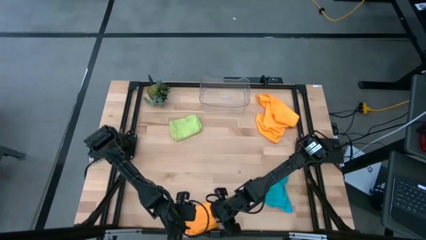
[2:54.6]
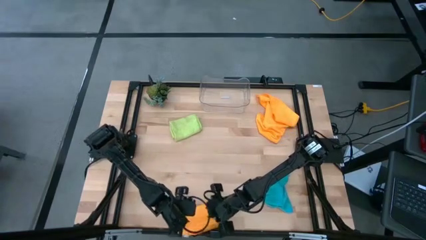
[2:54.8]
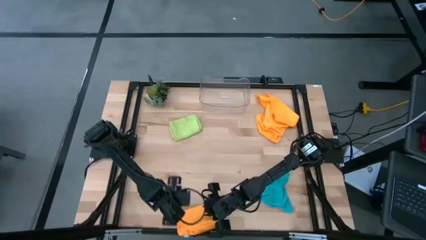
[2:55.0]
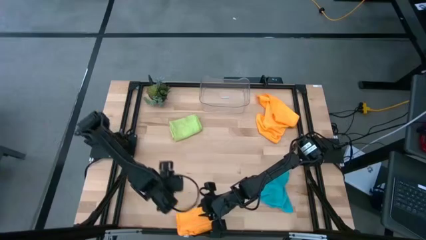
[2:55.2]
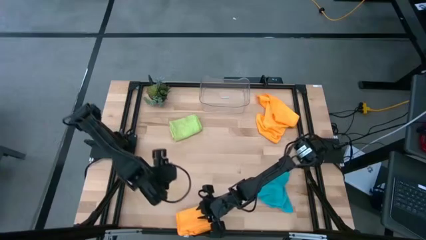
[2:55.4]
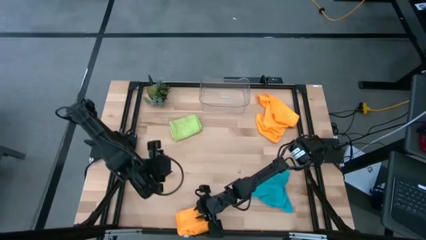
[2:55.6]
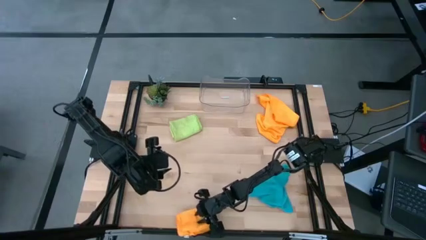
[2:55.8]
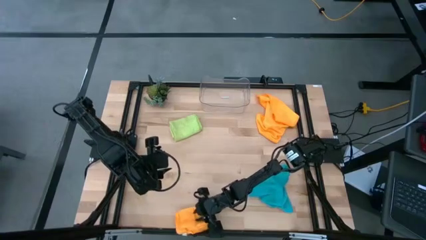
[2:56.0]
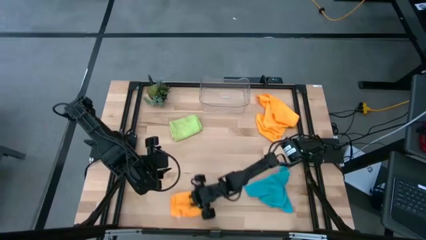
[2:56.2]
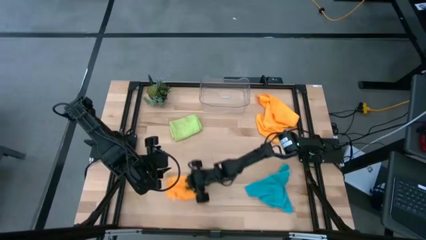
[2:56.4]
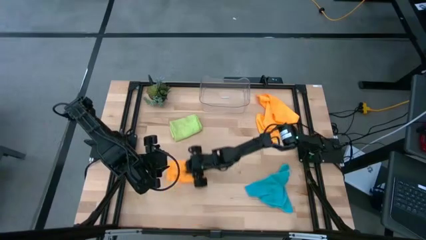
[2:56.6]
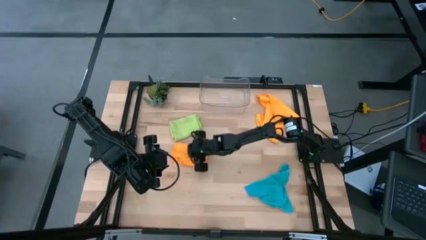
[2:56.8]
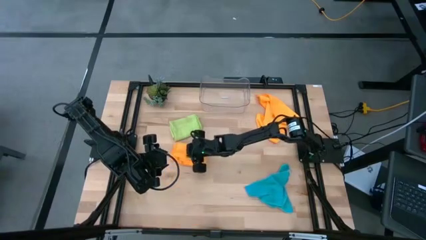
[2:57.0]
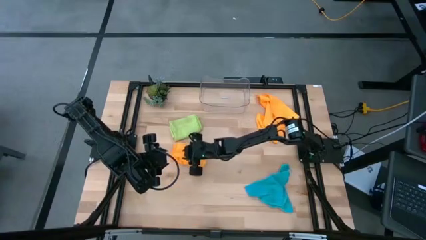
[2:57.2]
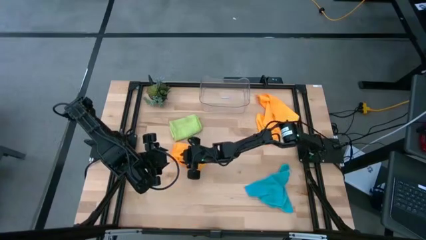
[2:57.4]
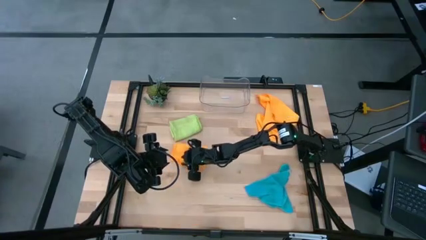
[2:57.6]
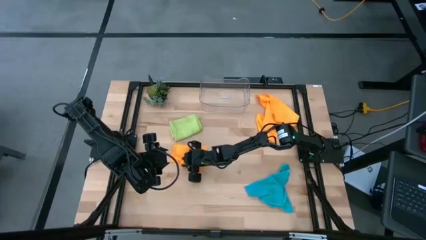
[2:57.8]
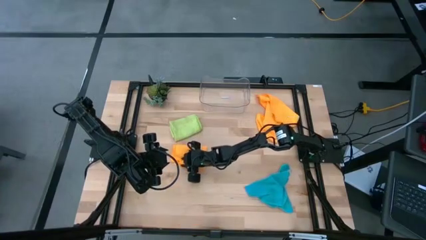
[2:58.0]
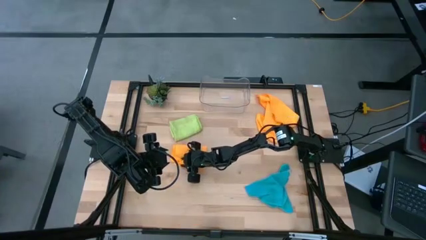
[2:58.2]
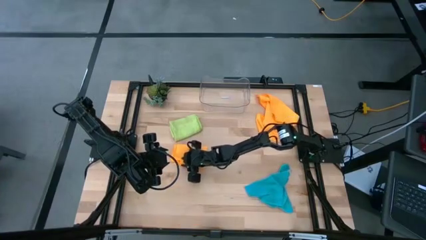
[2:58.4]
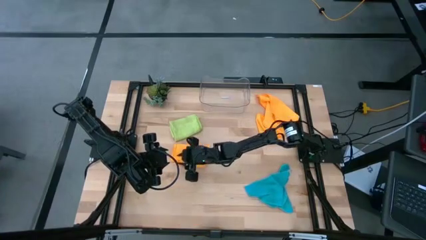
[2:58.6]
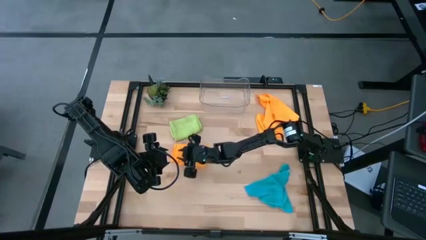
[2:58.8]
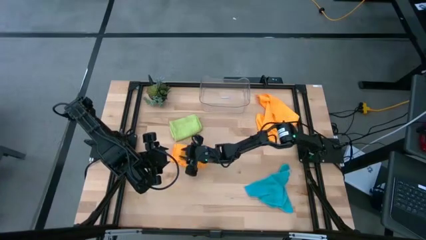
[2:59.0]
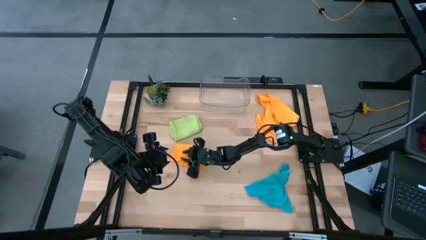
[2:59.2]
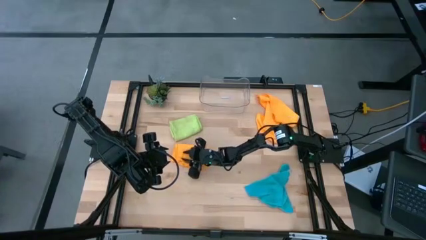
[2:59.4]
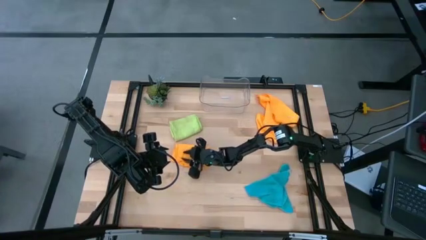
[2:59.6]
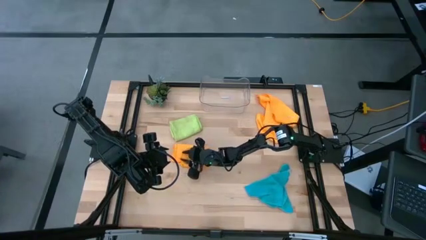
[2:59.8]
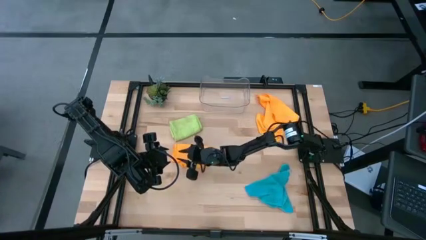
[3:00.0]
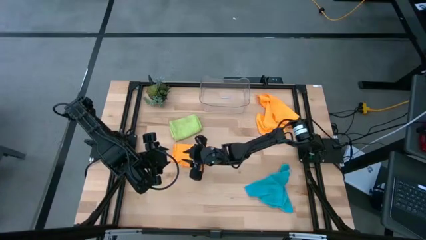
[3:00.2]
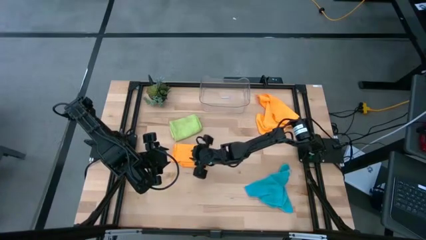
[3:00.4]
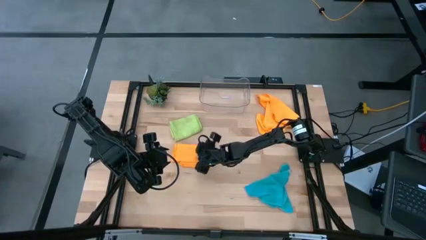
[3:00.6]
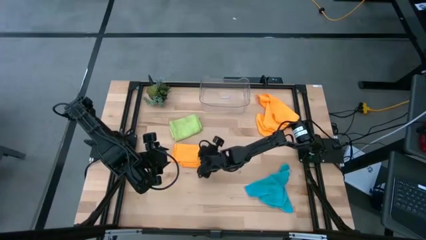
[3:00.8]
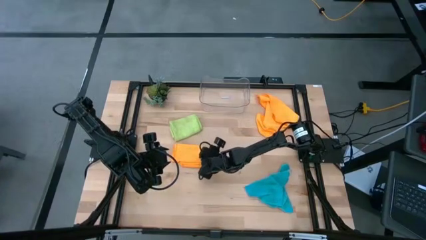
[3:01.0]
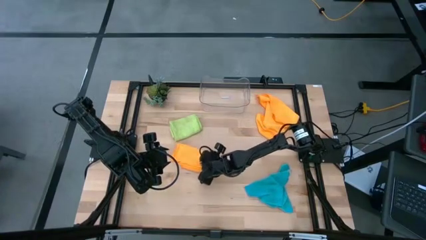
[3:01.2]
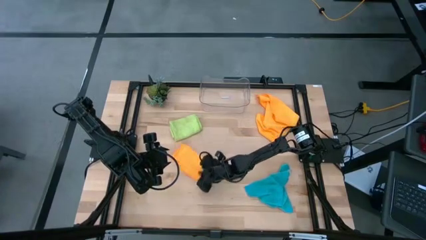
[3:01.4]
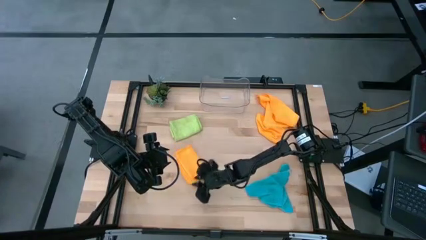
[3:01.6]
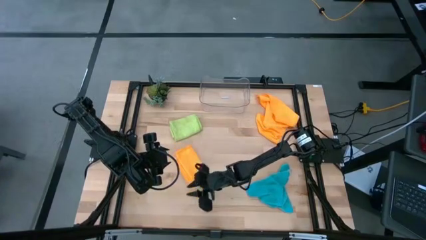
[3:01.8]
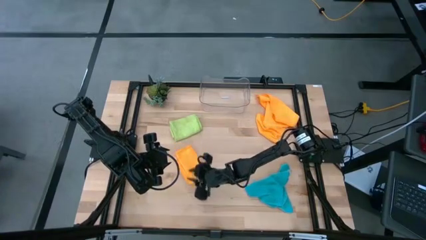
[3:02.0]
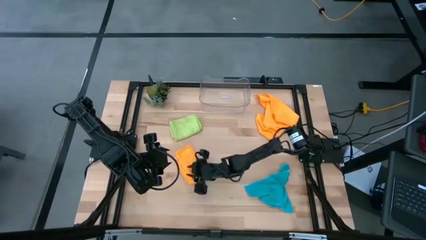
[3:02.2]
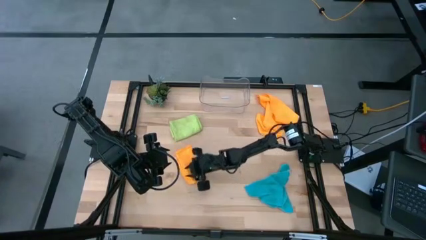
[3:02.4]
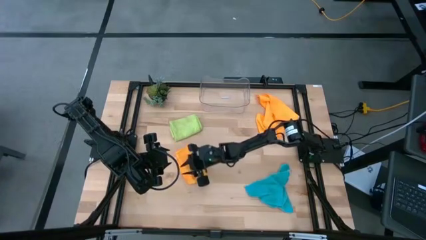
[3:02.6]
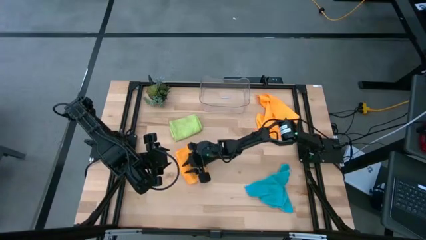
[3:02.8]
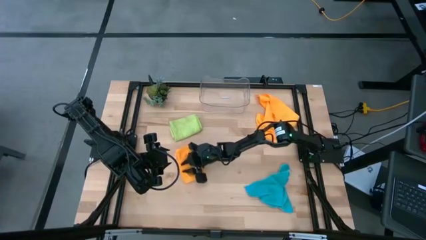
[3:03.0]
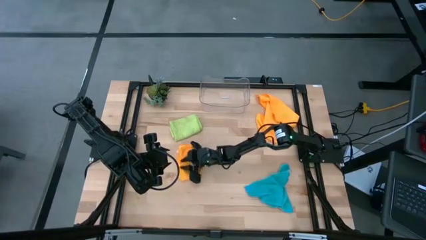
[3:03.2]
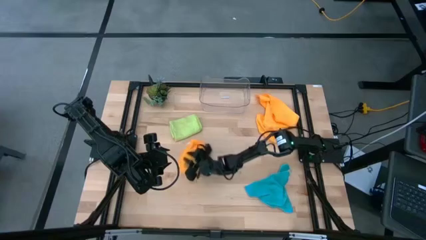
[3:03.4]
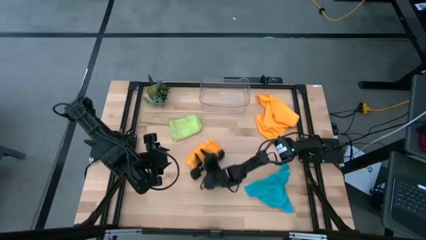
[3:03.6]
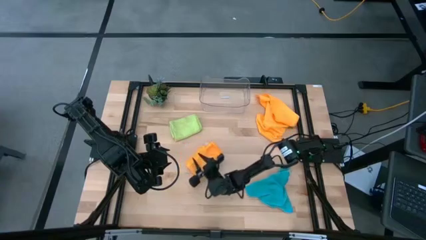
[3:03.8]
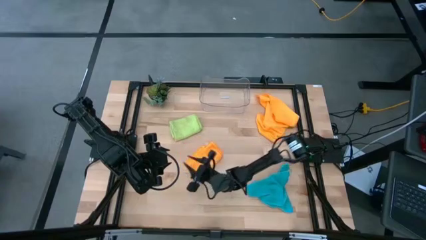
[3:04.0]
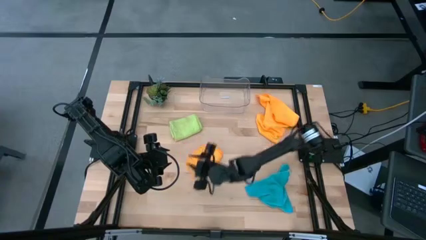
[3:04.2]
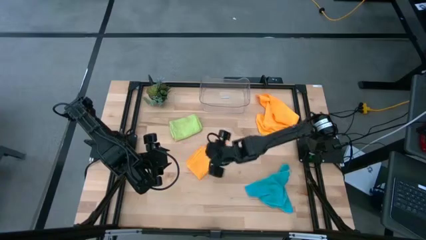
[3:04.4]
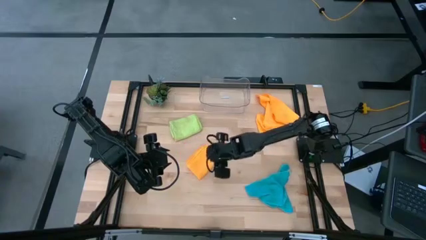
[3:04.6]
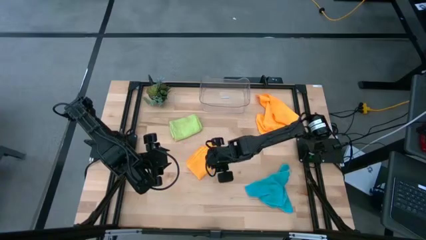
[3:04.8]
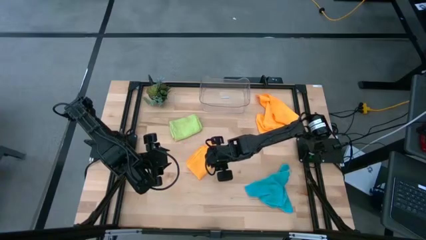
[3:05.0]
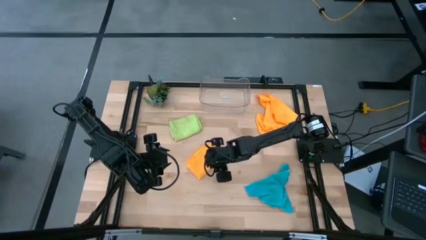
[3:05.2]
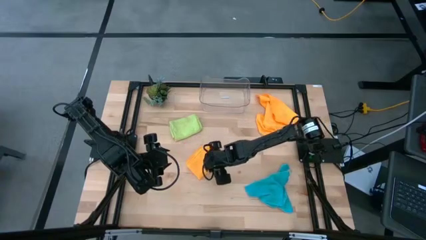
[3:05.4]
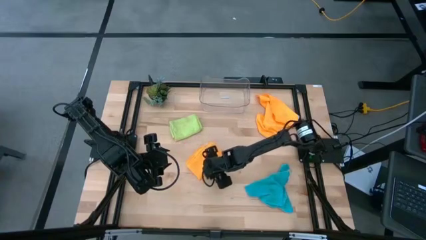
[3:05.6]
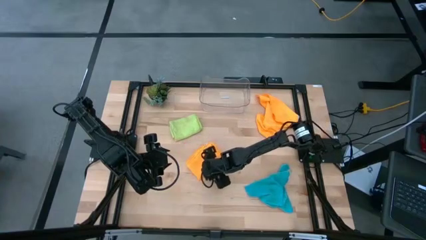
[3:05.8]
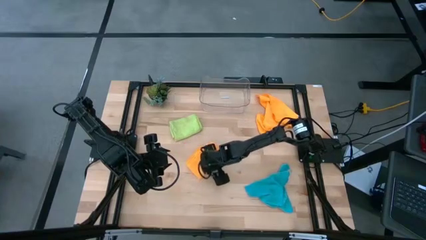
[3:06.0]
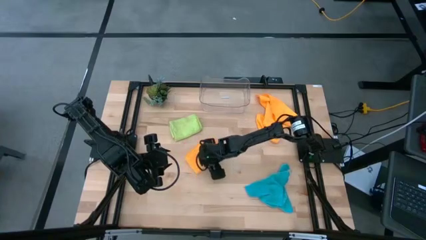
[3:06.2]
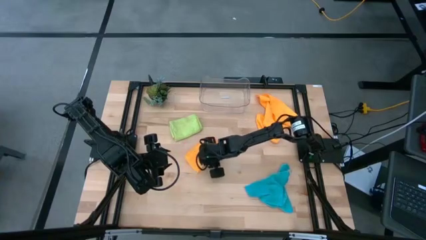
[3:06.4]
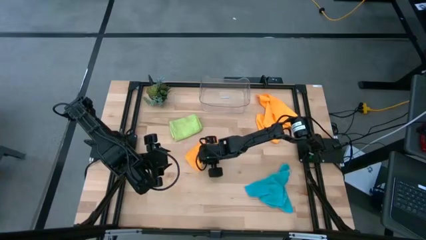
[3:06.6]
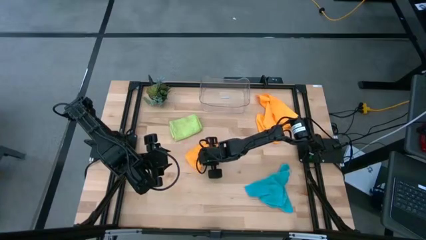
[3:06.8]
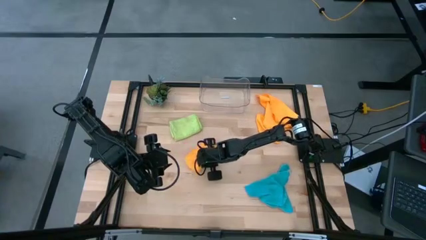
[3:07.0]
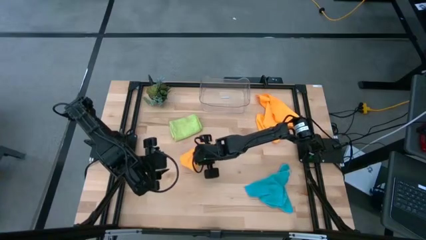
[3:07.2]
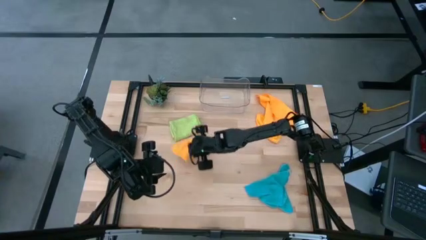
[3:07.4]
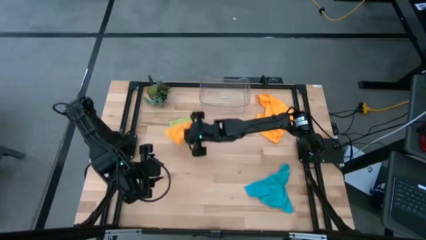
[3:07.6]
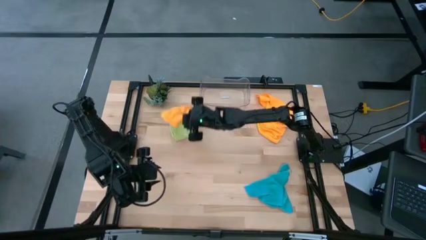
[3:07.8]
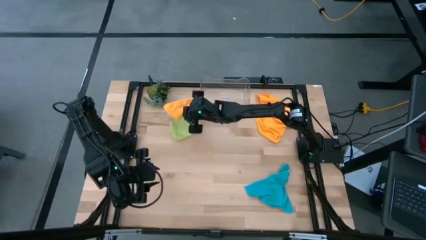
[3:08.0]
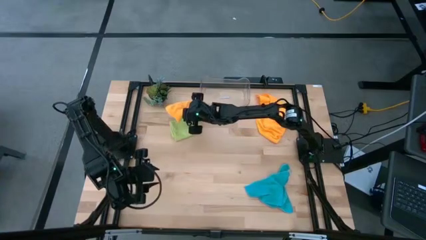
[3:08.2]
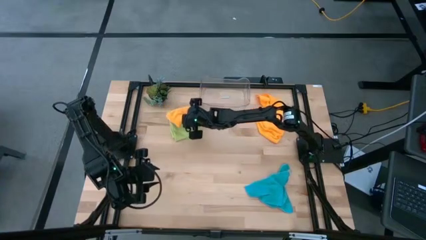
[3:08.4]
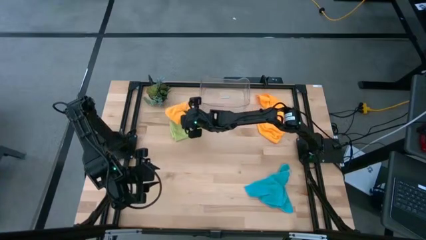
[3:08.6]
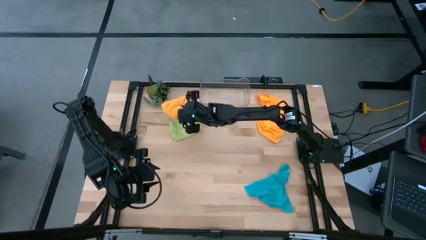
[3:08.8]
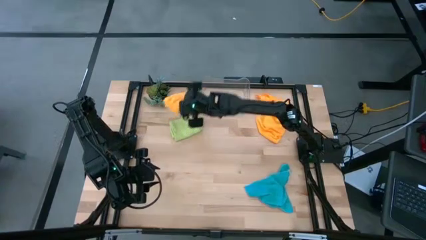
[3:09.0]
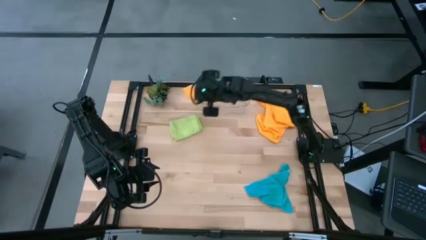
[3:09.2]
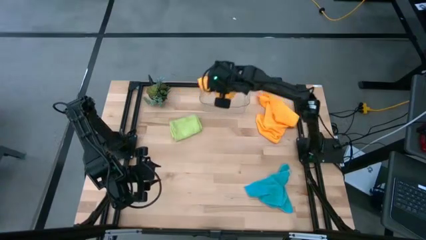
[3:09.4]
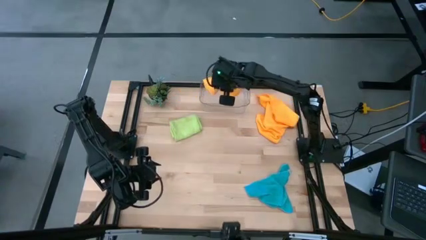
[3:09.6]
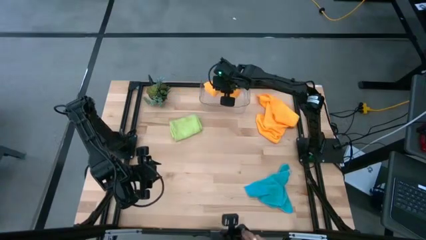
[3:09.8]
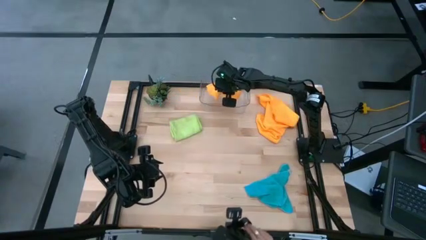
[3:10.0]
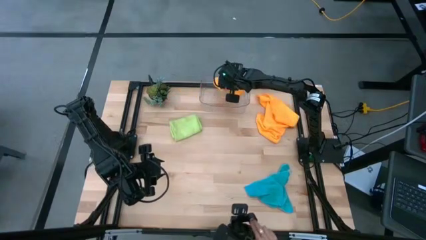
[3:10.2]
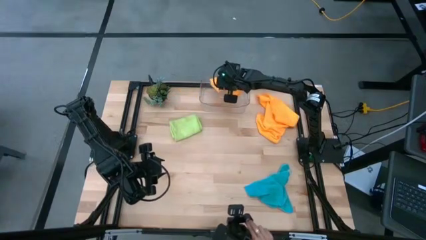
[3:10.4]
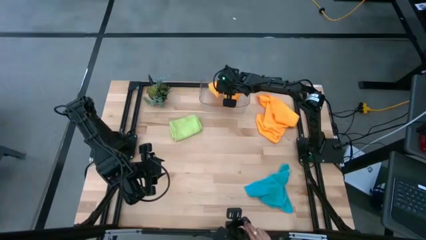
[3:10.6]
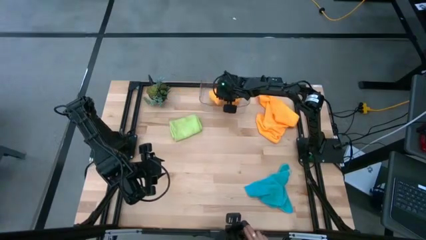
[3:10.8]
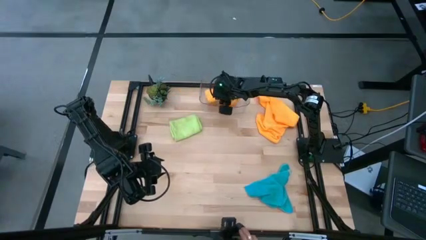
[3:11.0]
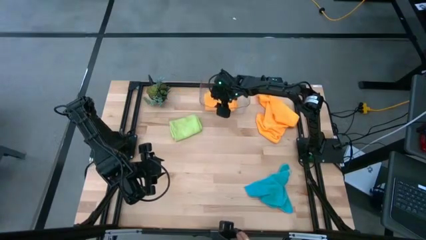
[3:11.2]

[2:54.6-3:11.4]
Task: Fold microfiber towels
Put the orange microfiber cloth into the transparent bin

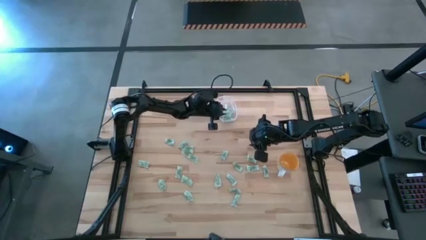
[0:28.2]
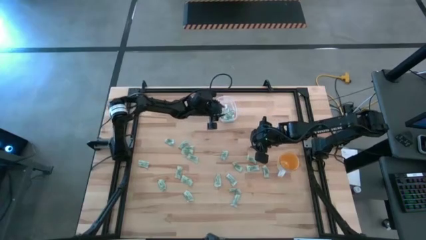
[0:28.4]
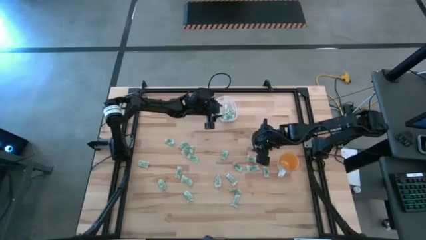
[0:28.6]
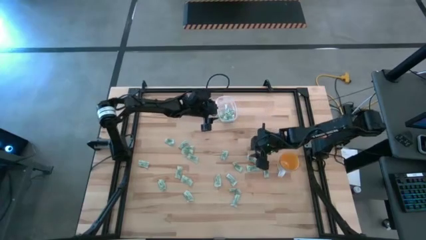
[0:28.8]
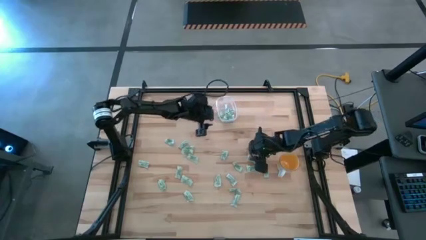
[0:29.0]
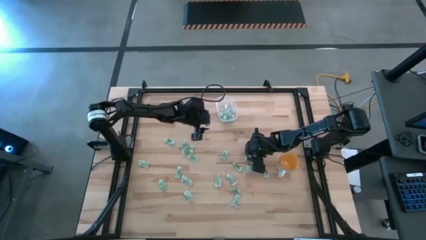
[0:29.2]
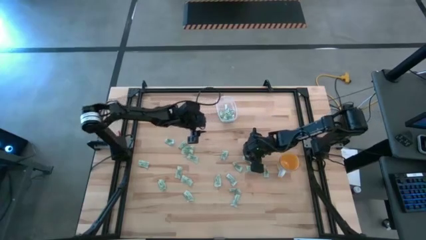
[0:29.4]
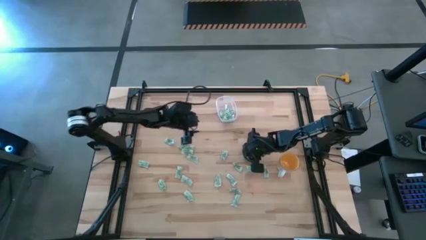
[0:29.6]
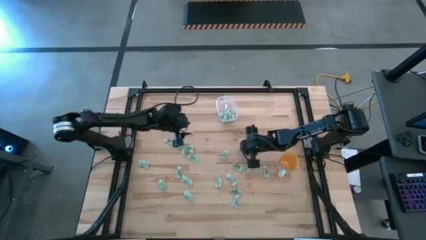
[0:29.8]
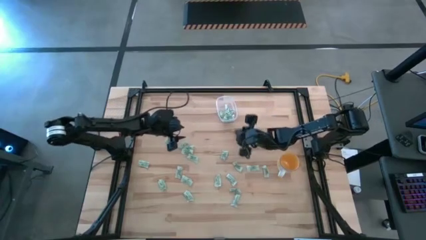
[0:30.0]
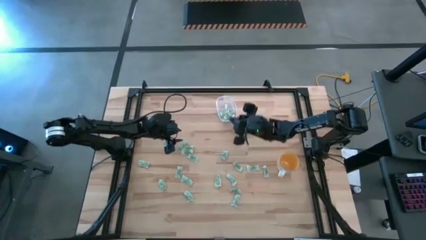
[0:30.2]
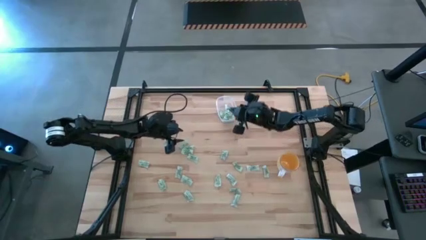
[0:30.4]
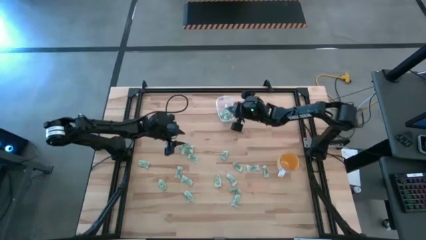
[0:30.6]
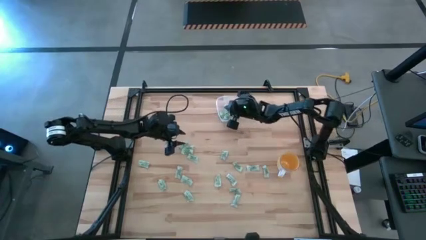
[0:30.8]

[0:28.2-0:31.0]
Task: Pick and place Stevia / Truvia into bins
Put the green stevia packet into the transparent bin
